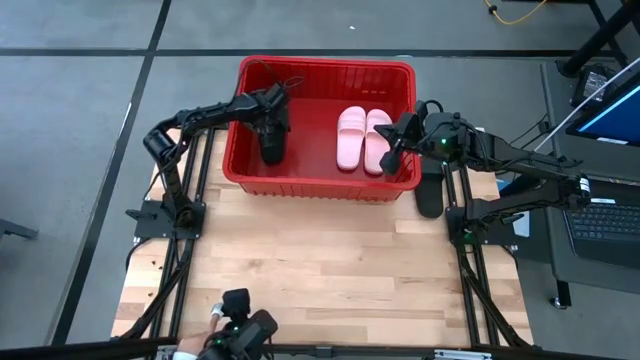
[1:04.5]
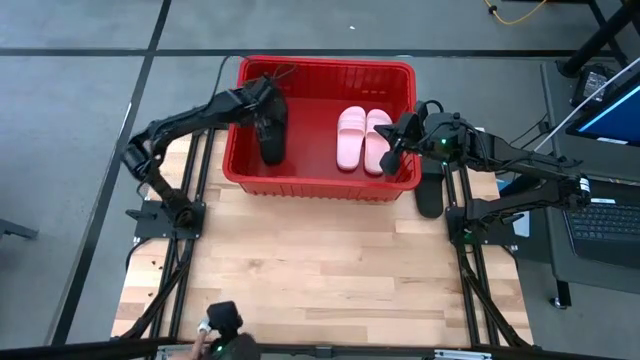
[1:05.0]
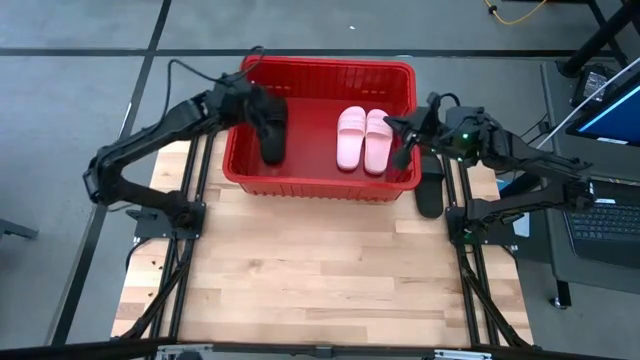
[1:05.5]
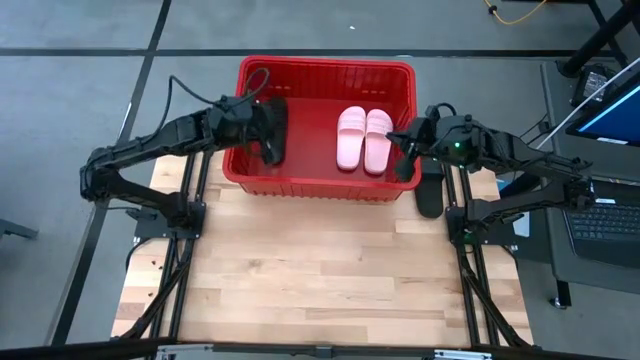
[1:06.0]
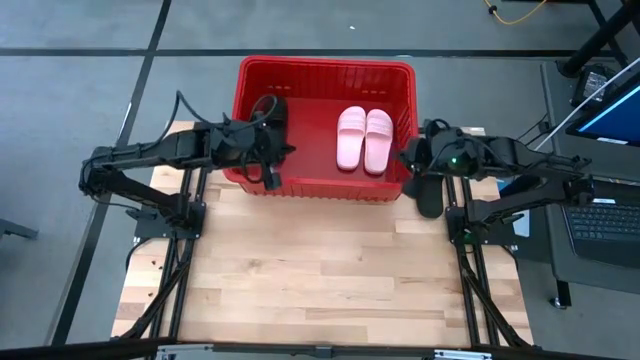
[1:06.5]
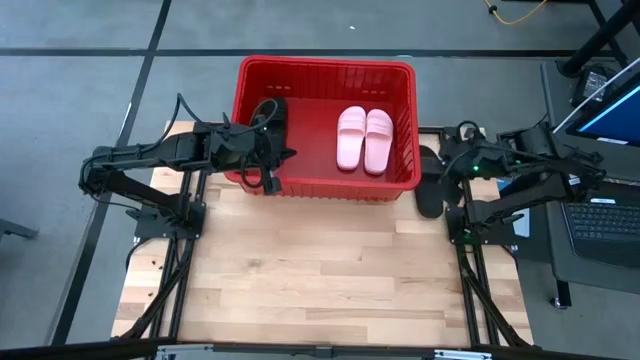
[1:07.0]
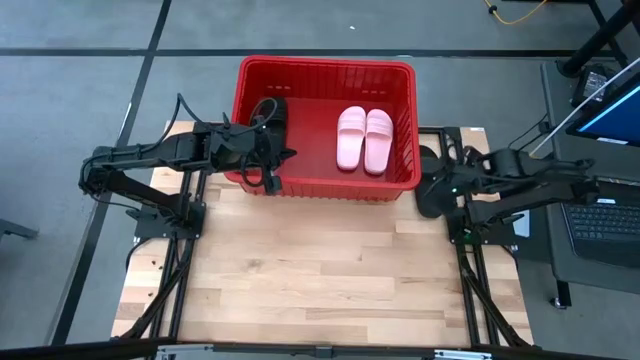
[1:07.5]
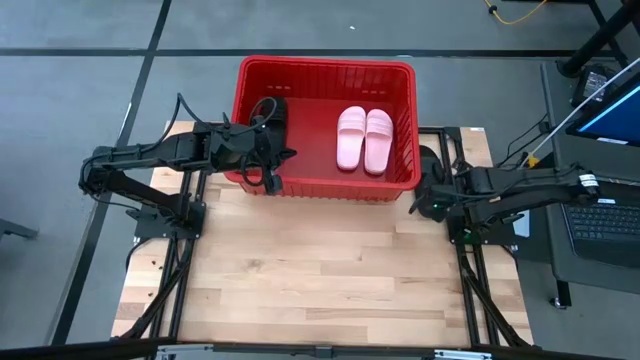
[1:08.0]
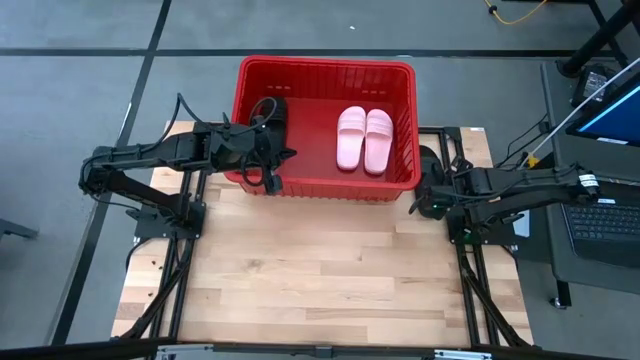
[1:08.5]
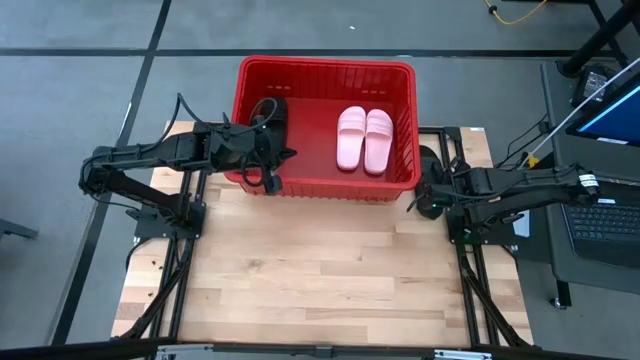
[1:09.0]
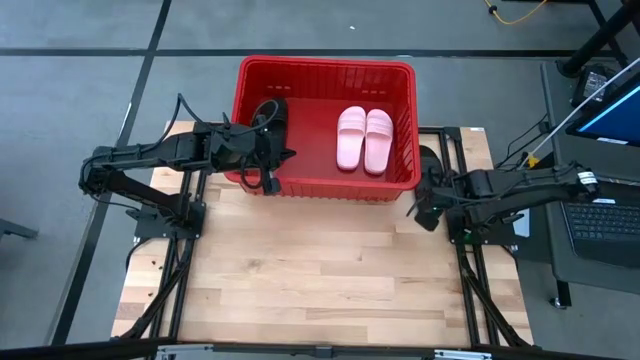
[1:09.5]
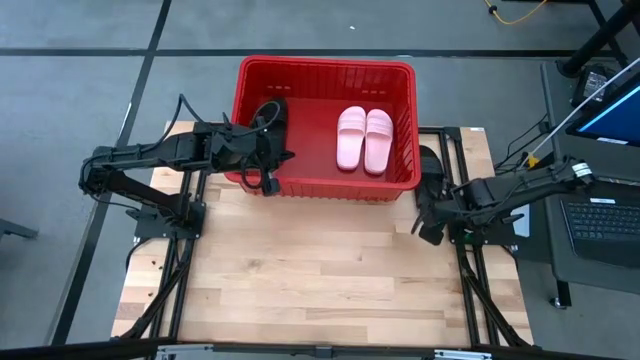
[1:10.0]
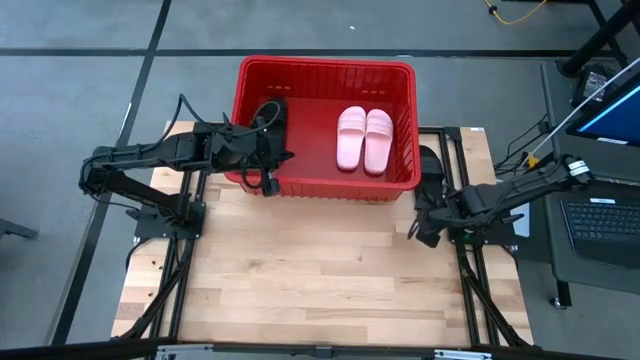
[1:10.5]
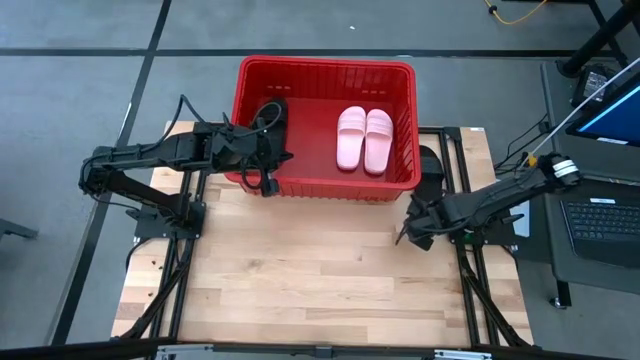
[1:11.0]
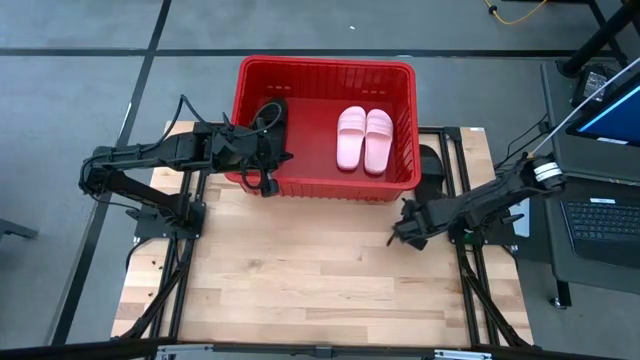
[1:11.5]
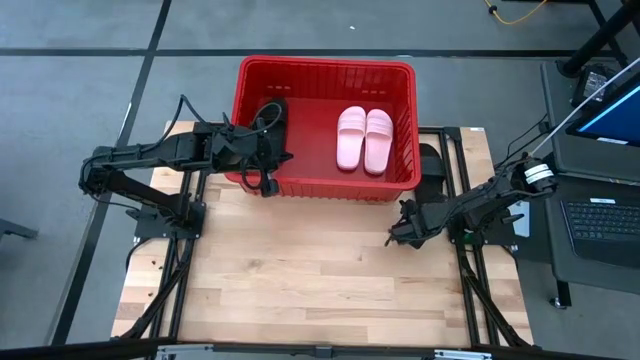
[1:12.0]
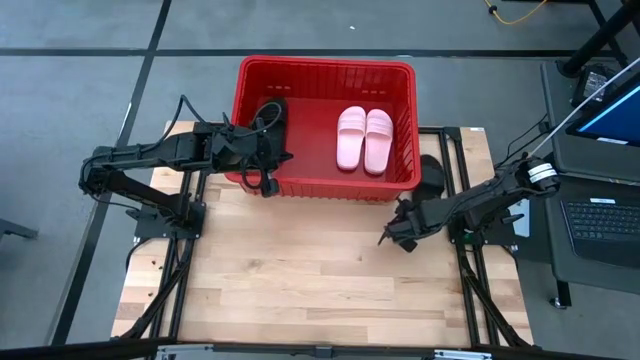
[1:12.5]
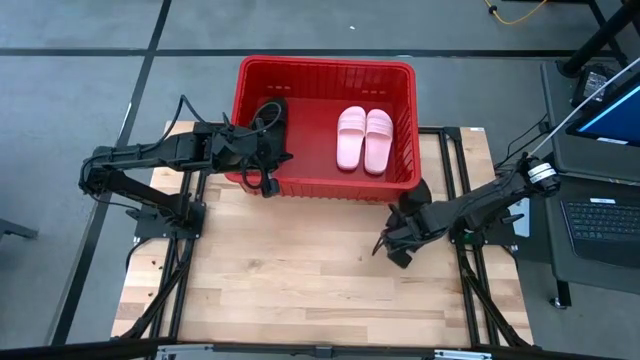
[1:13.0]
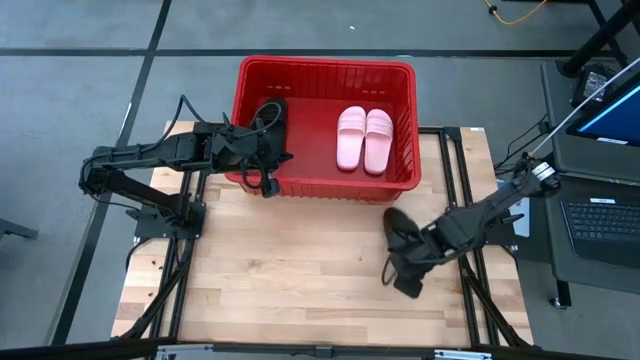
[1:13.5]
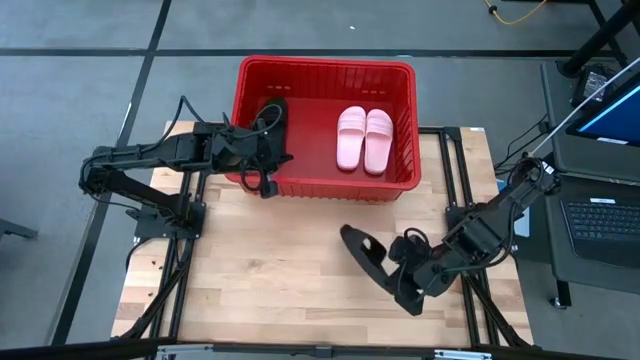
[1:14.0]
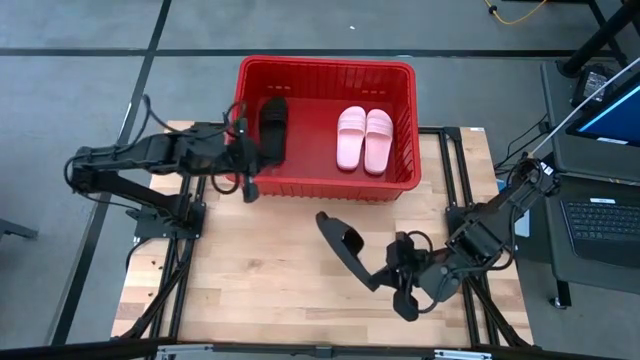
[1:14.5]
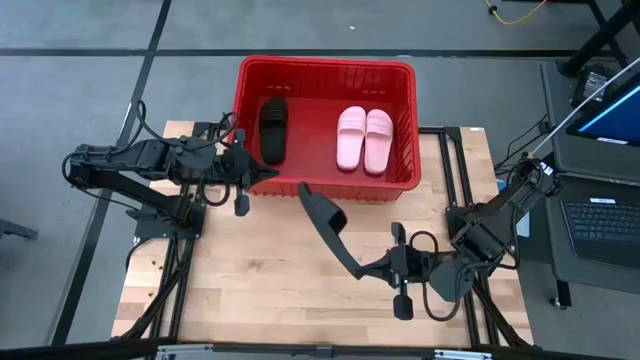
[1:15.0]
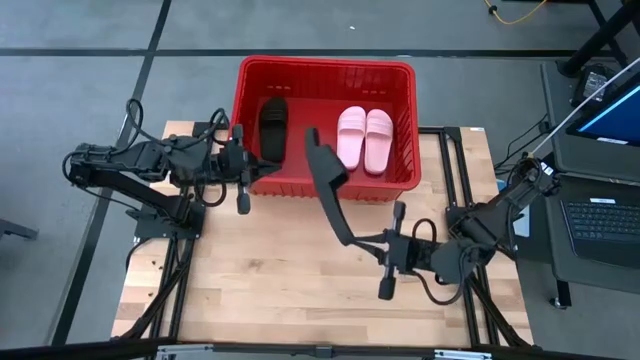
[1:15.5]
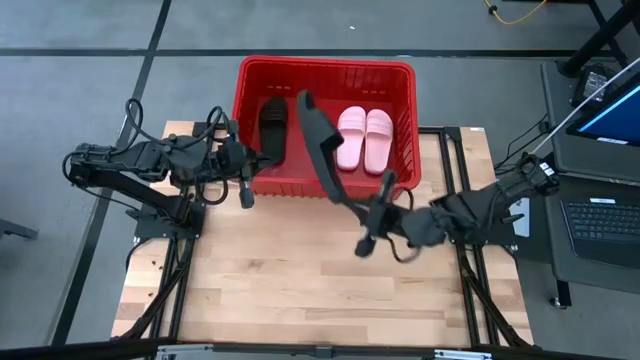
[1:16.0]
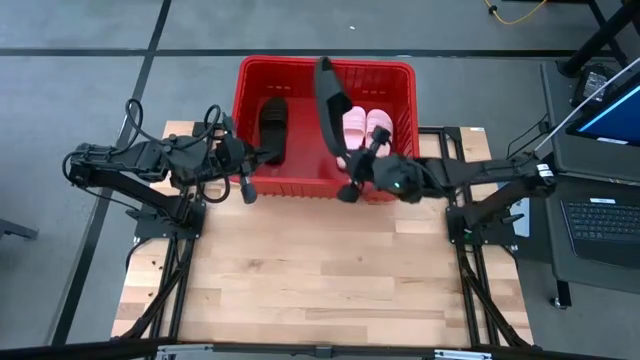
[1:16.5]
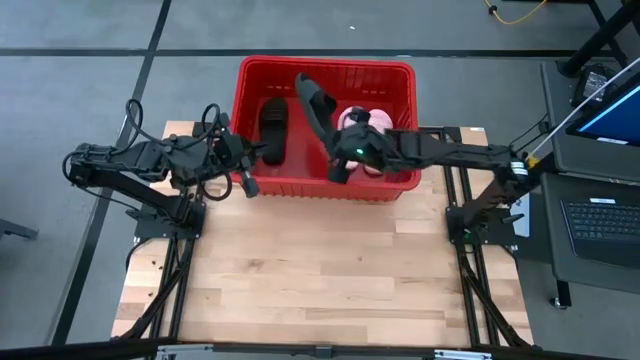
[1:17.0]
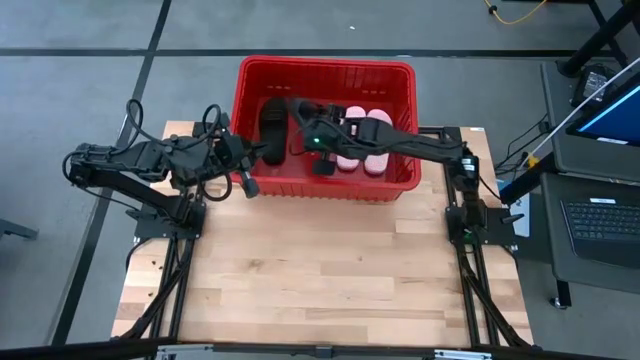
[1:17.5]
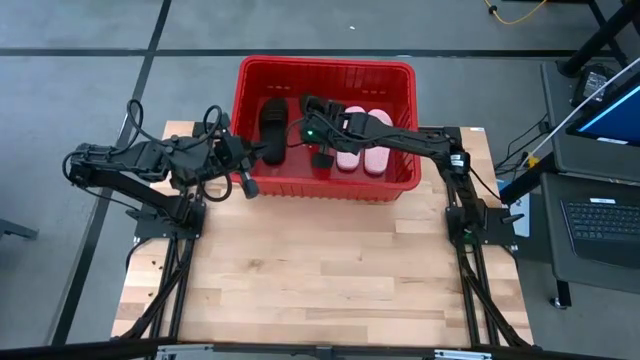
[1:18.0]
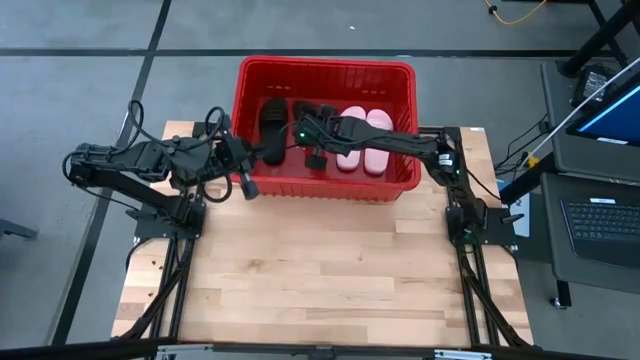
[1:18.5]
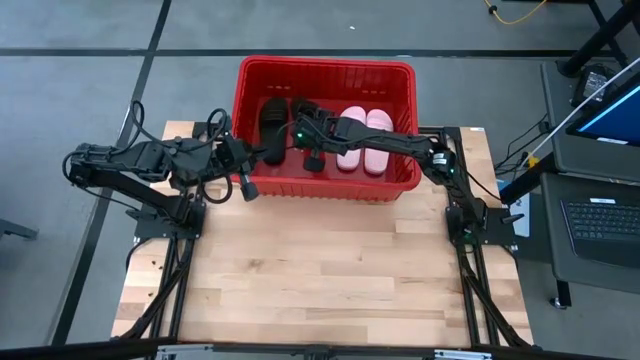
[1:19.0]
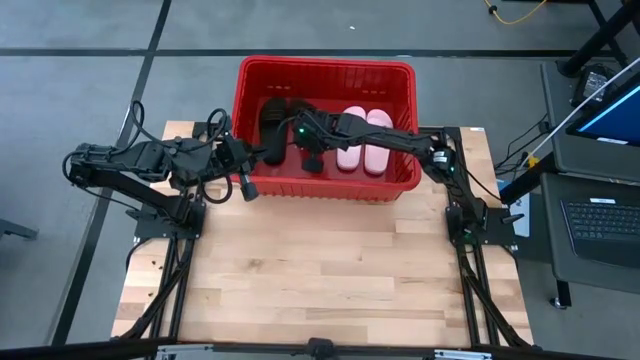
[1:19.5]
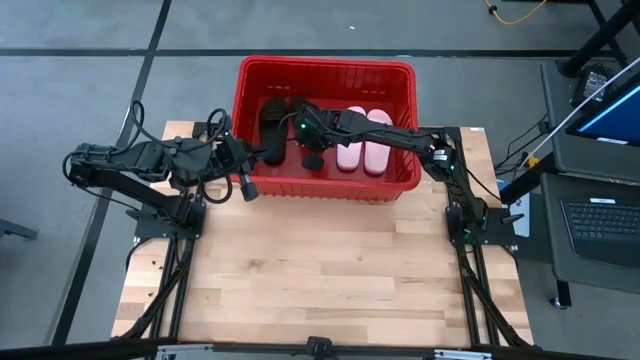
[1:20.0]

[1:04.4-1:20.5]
Task: Pick and place slides into bin
Put the black slide into the bin

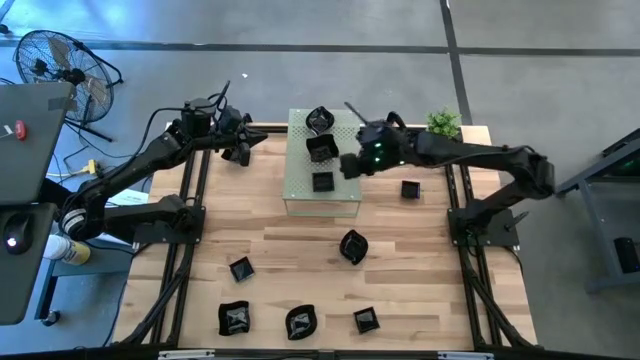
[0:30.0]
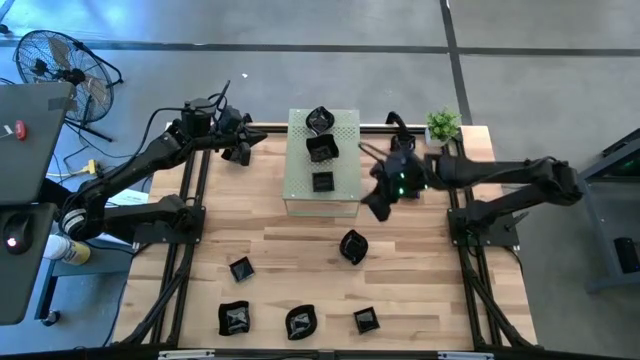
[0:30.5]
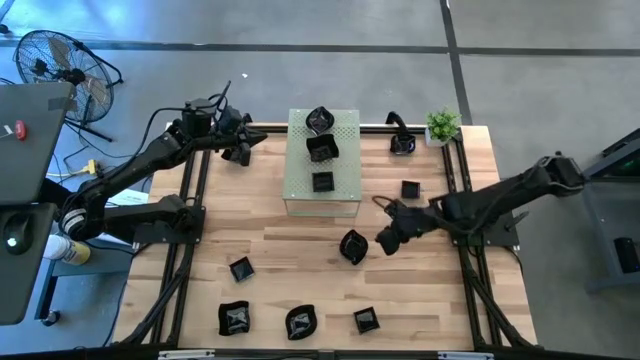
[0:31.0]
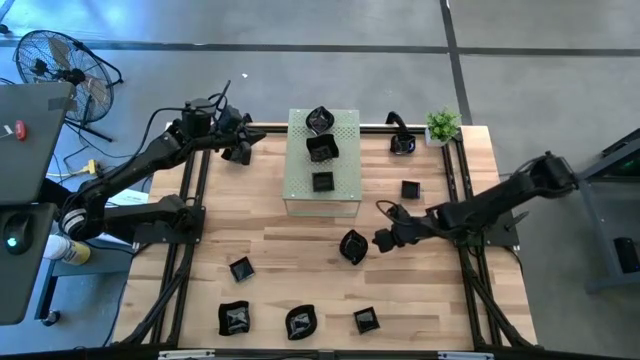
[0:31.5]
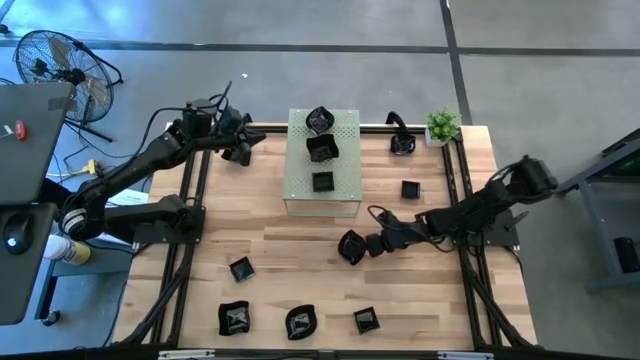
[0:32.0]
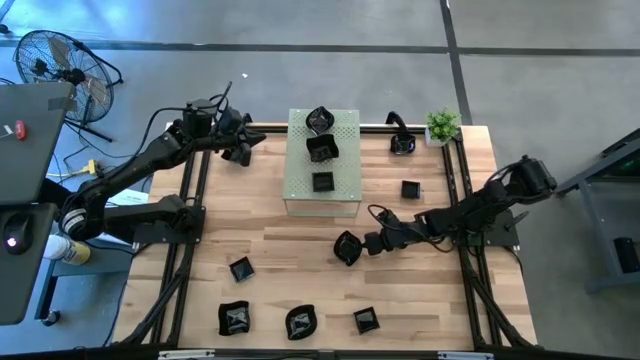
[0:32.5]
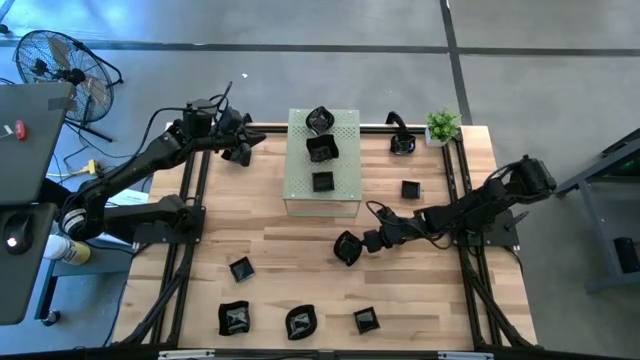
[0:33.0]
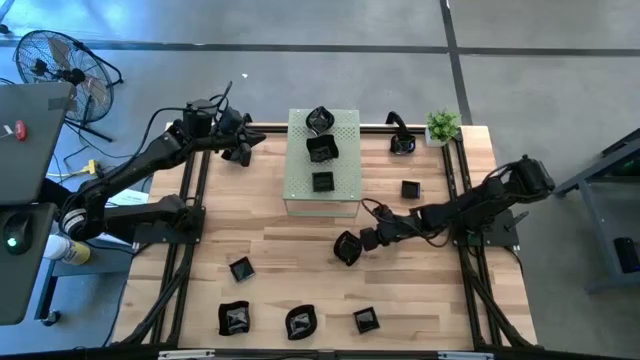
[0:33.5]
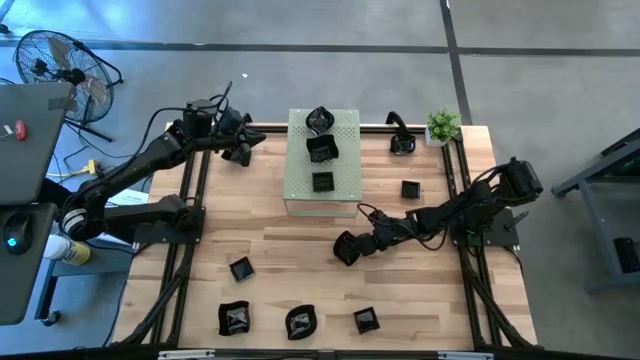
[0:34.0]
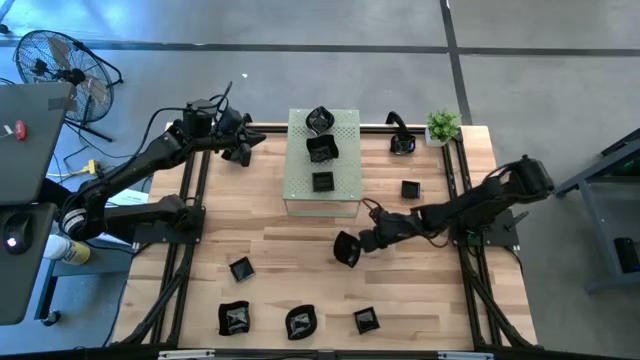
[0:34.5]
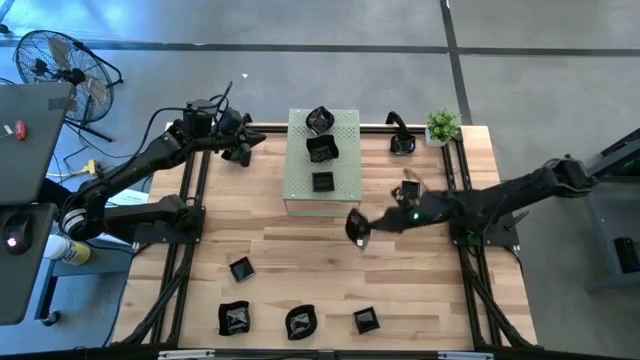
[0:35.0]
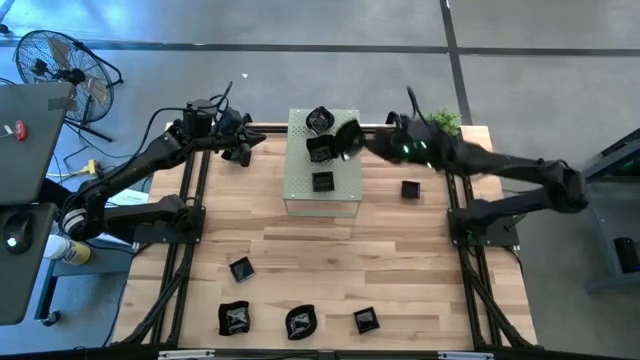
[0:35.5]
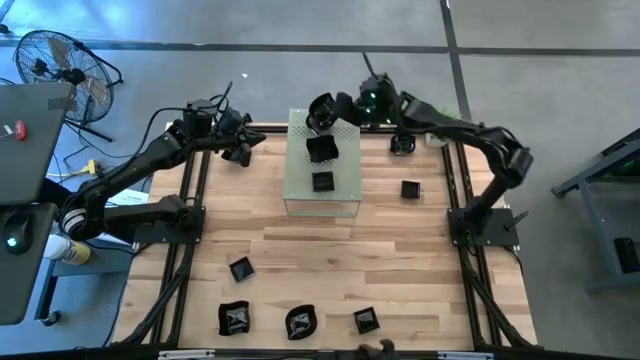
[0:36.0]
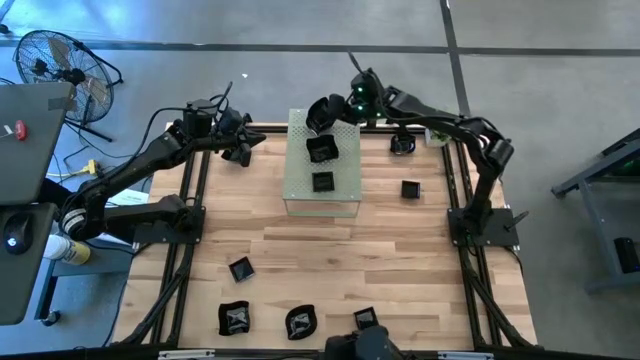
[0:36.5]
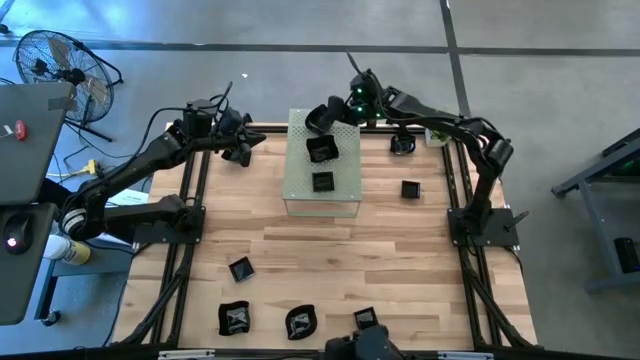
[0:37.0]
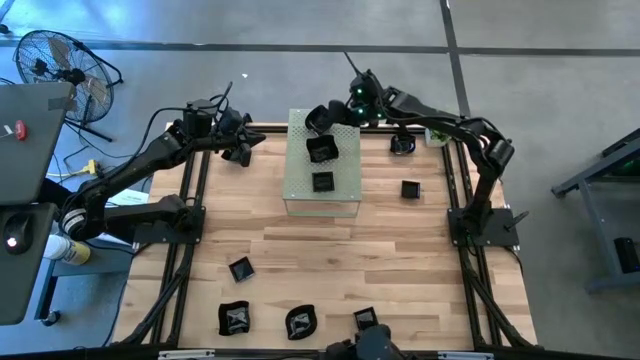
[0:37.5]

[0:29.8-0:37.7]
Task: Pick & Place Mini shaped plates
Stack the top black leaf-shaped plate on top of the black leaf-shaped plate on the shelf
